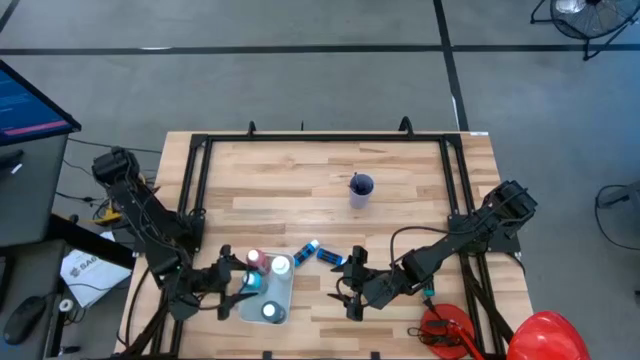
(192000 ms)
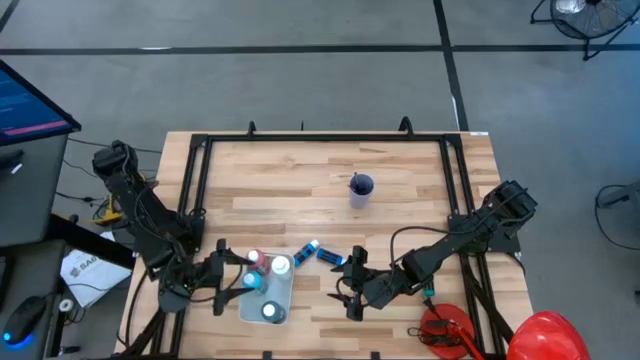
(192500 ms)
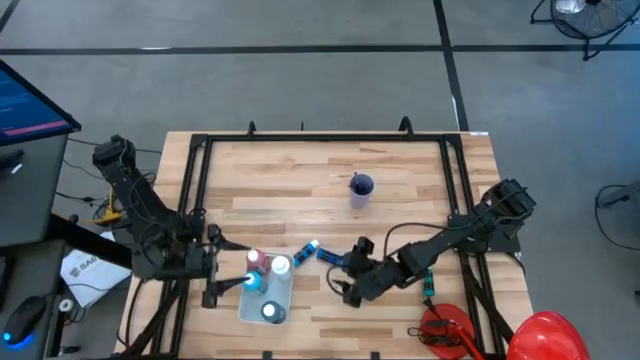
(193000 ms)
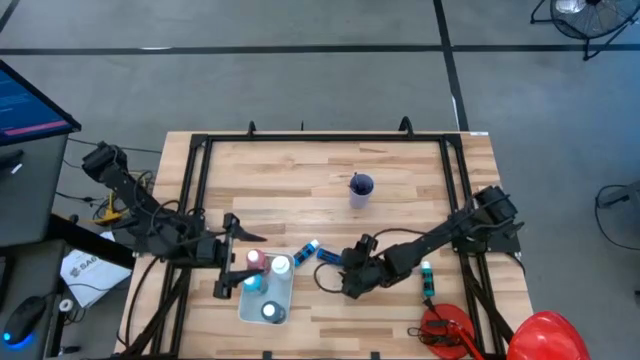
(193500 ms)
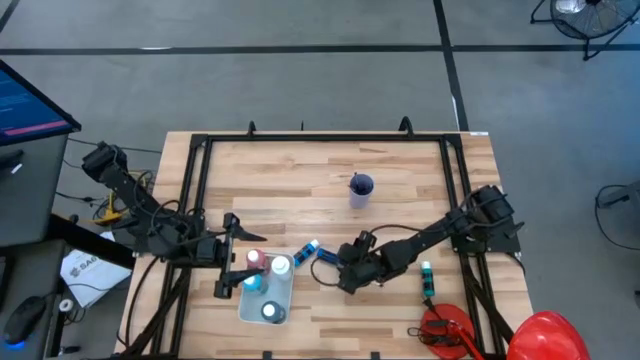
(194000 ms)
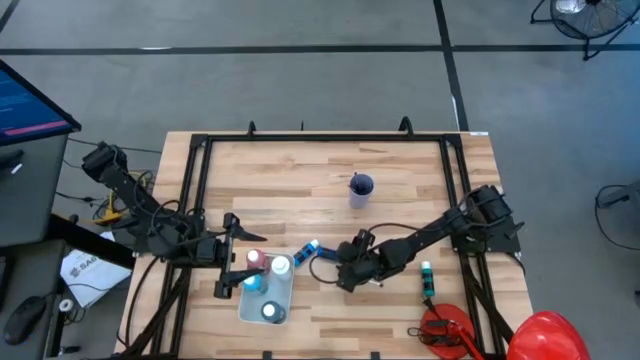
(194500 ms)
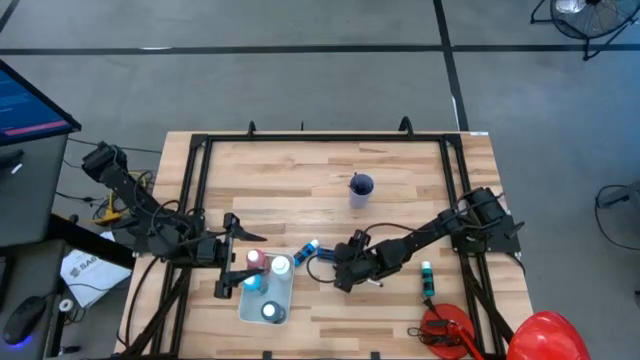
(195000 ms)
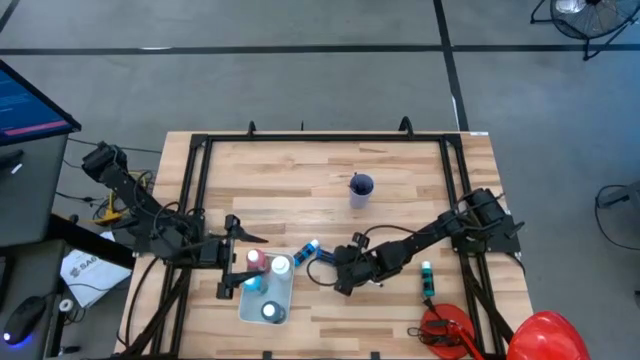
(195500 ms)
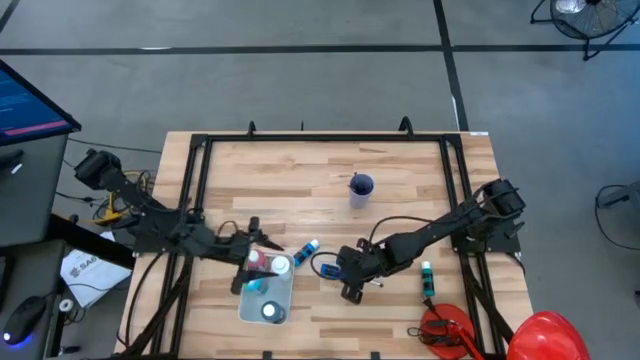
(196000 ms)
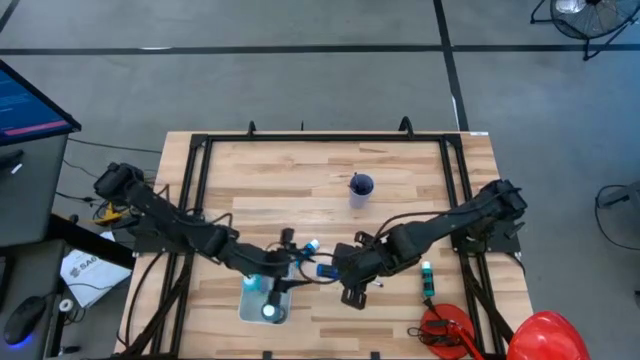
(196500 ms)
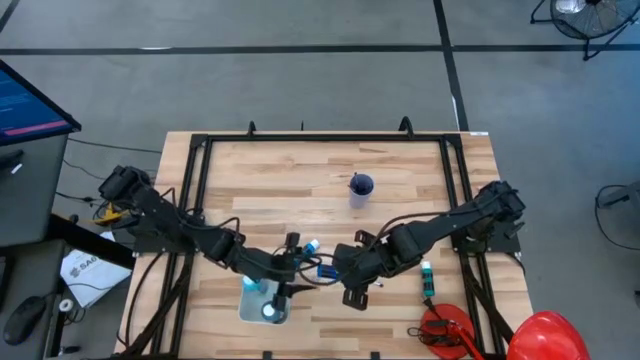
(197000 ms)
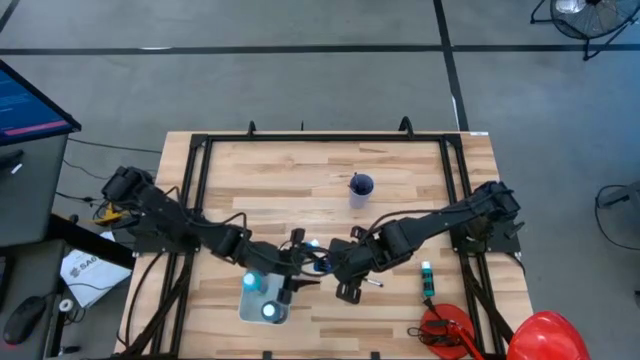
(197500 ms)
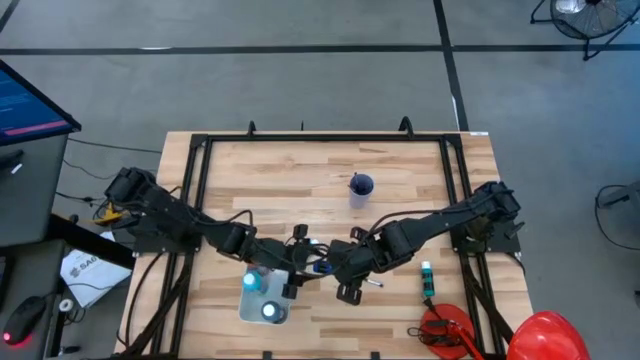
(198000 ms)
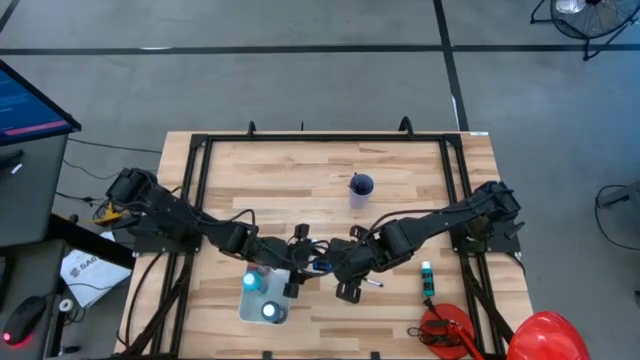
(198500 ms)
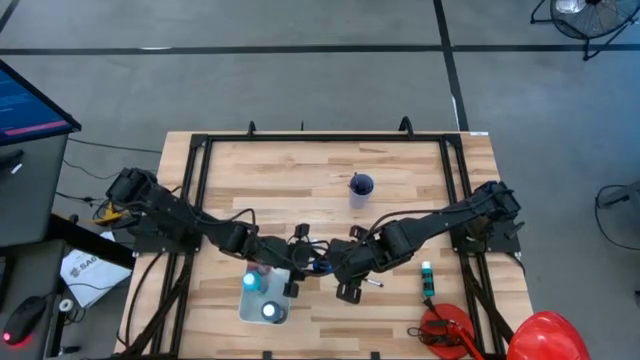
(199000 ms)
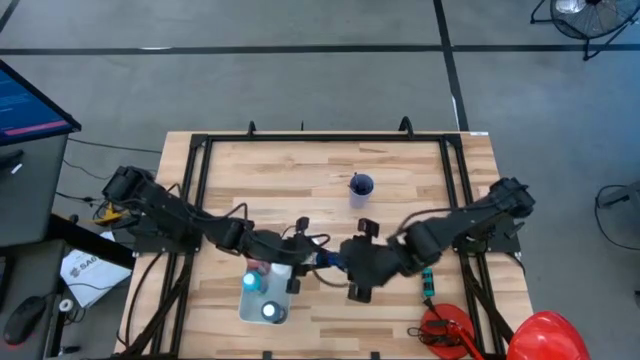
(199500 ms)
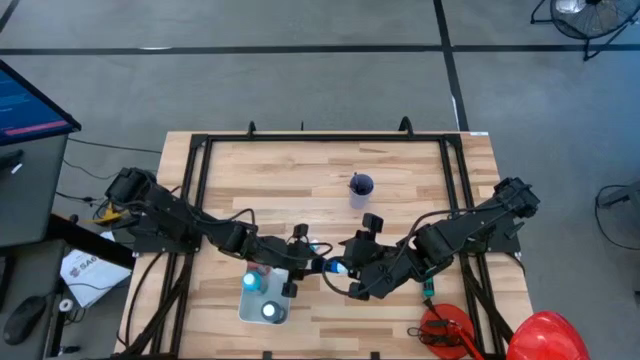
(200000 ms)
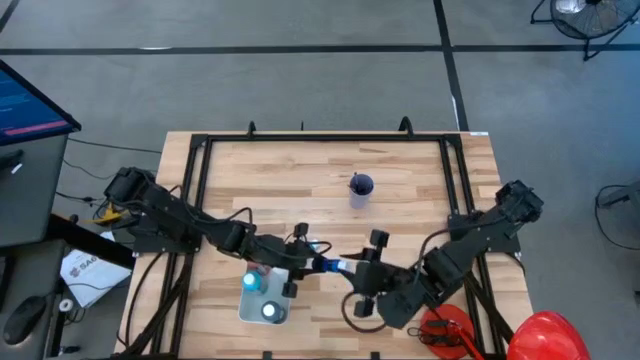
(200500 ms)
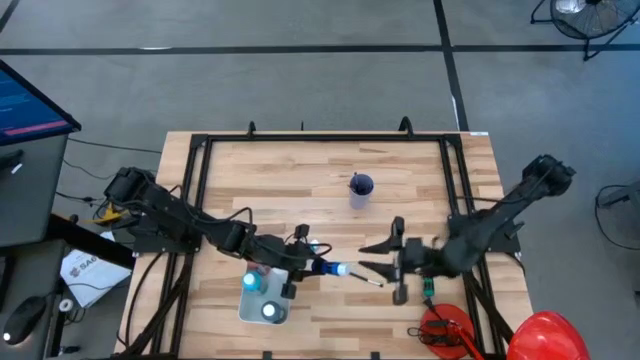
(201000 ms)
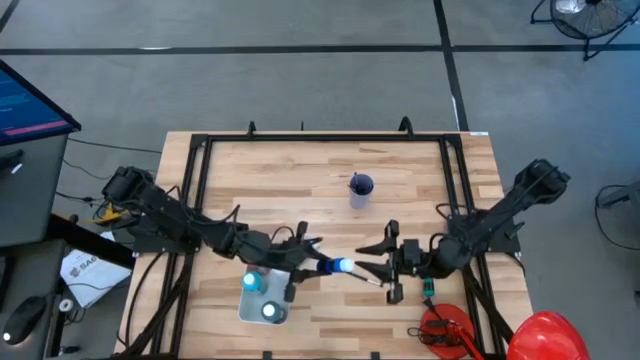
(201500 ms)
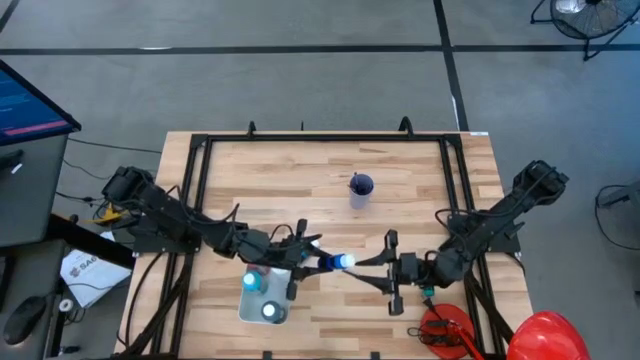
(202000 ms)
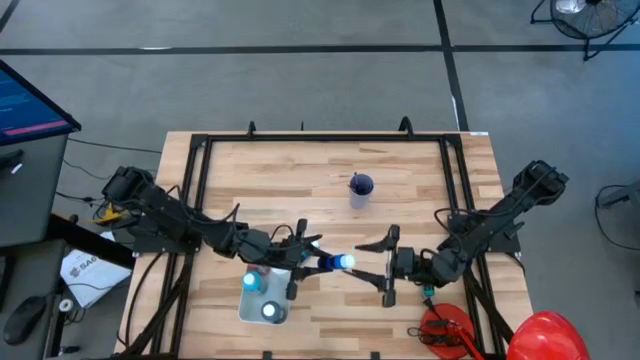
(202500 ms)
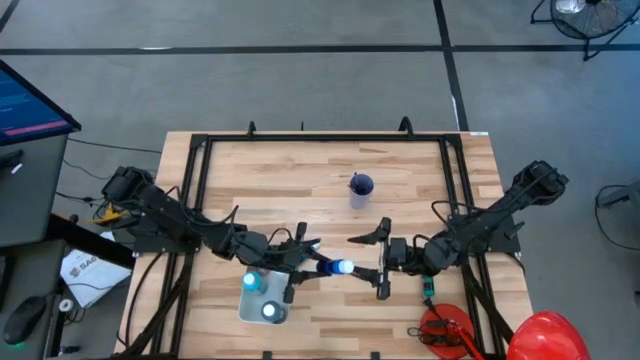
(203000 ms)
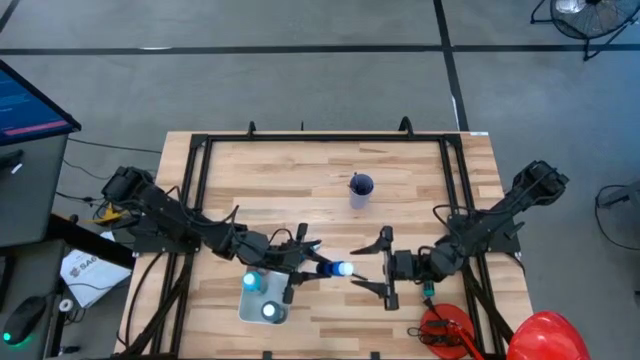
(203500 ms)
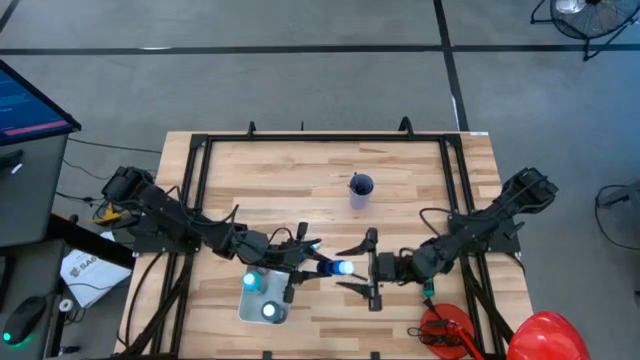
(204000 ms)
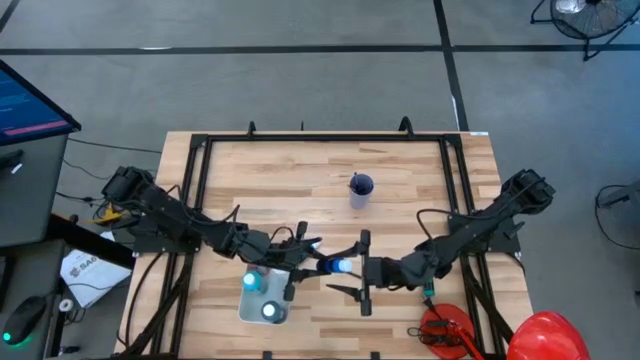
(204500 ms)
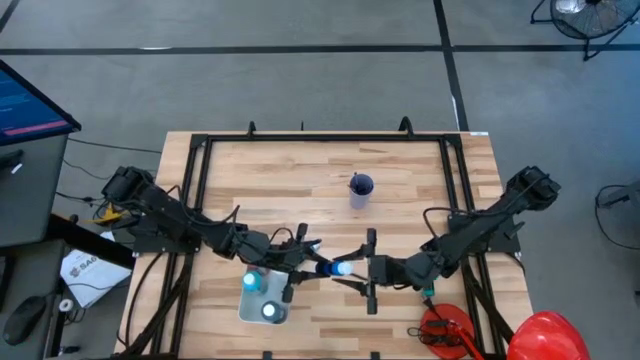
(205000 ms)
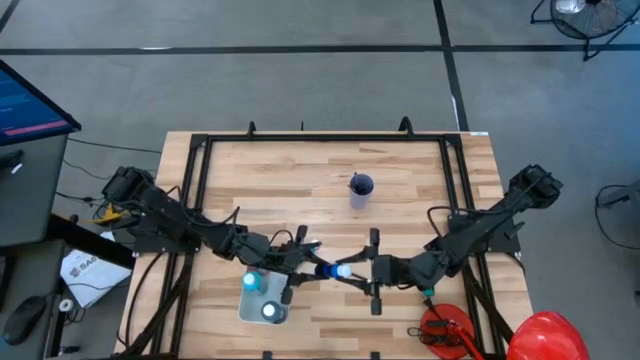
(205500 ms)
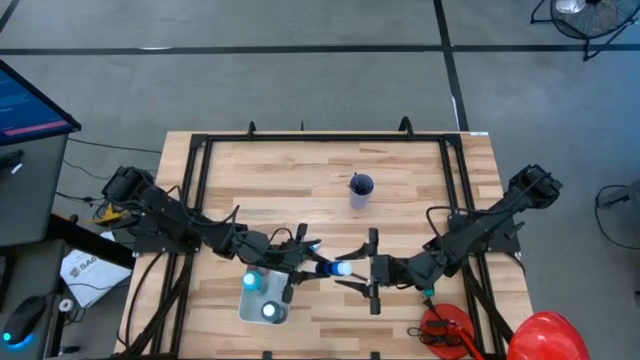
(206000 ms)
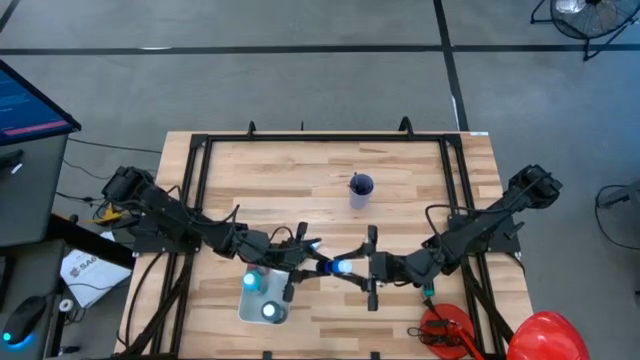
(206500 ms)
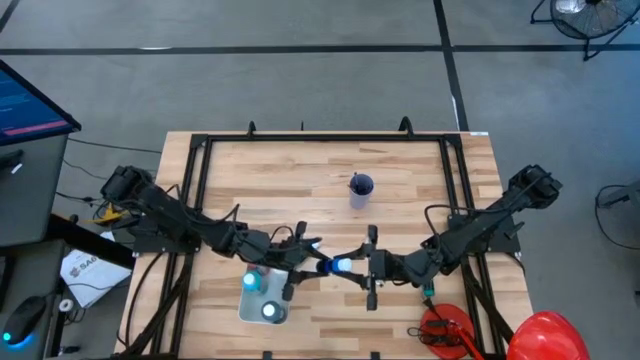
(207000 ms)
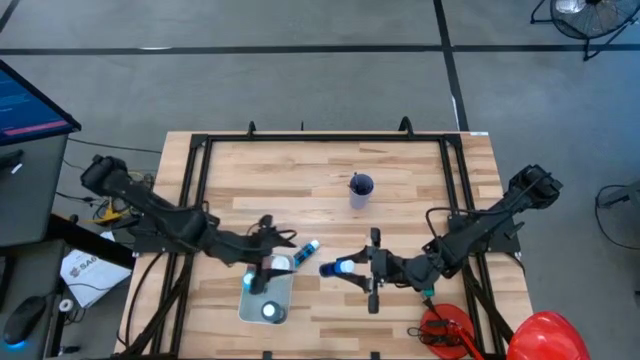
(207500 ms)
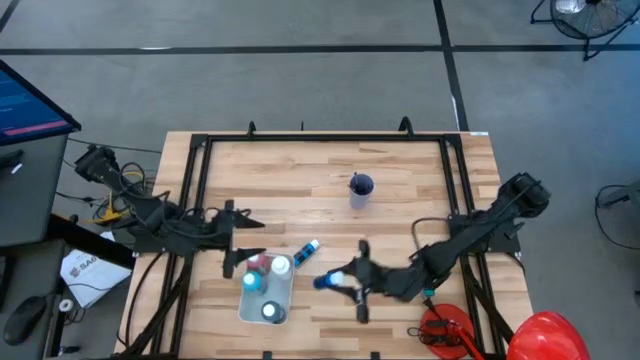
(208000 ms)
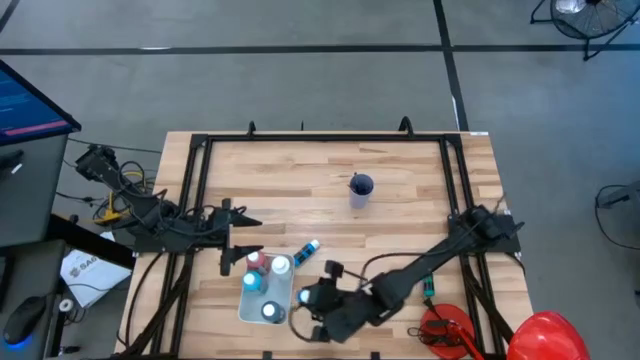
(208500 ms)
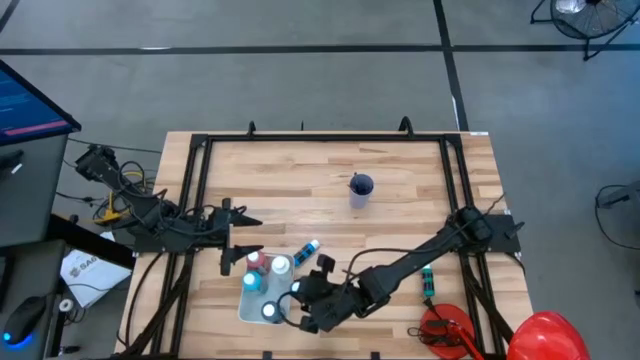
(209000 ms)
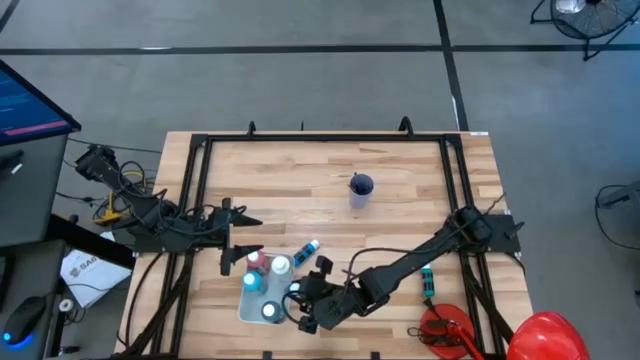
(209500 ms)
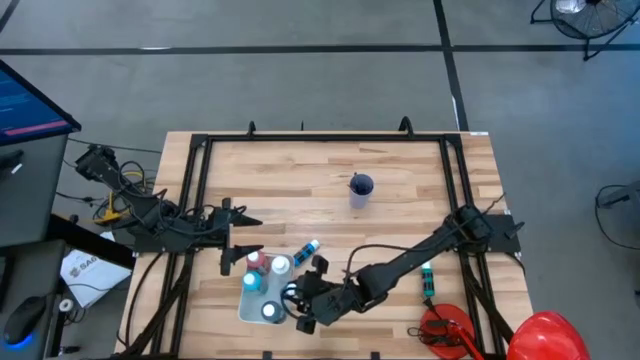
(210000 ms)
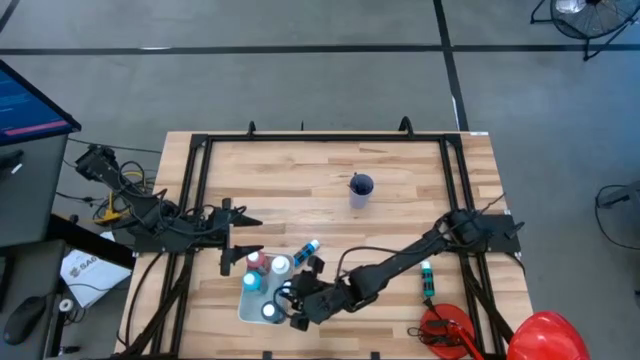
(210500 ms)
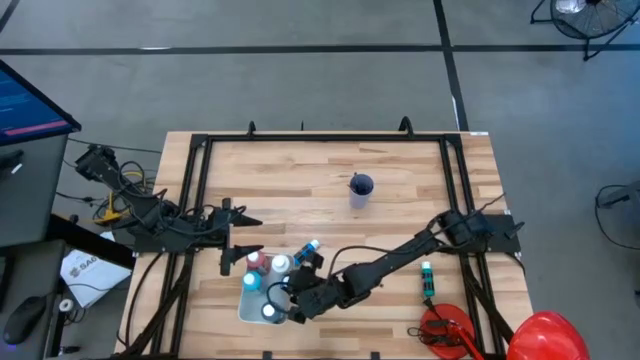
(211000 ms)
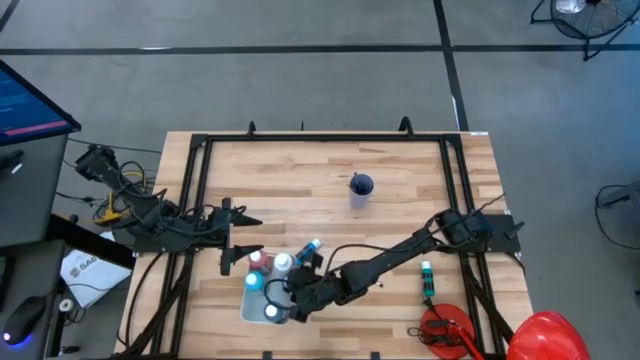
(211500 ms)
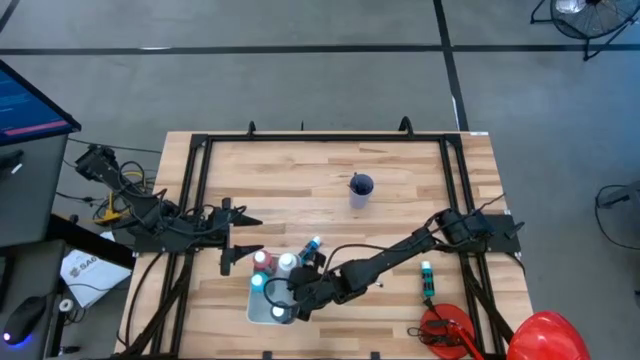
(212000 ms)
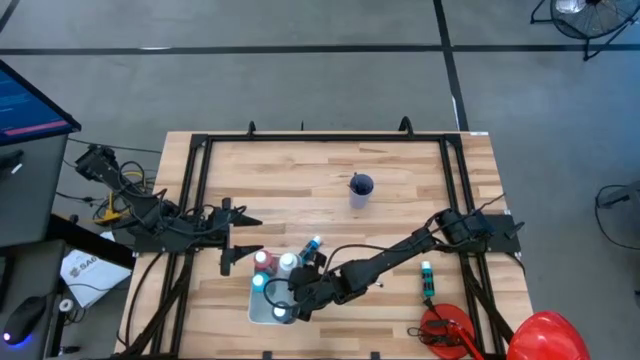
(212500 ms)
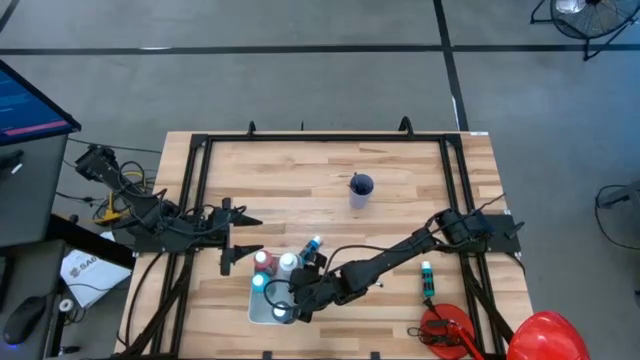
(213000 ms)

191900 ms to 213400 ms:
Task: Pick & Place Paint Supplies
Put the right black blue paint bottle into the white bin
